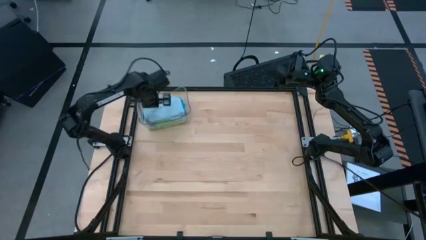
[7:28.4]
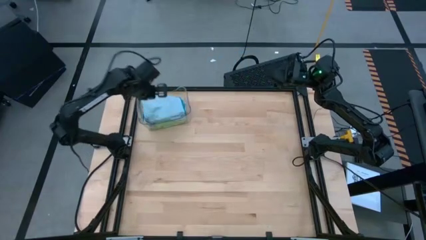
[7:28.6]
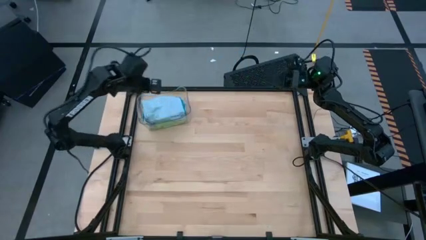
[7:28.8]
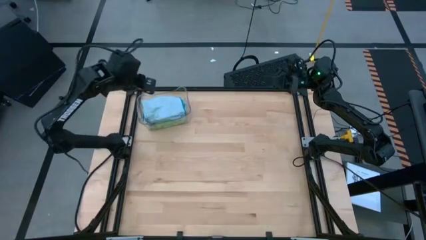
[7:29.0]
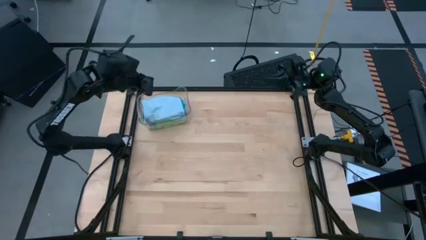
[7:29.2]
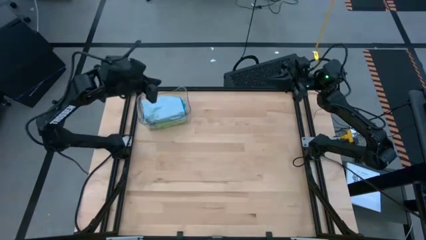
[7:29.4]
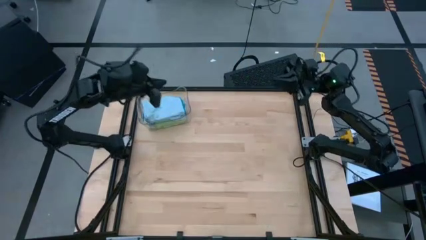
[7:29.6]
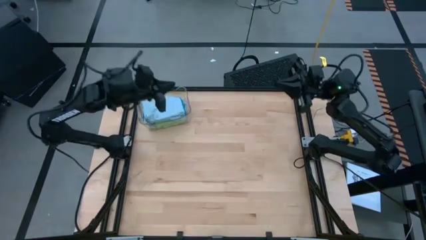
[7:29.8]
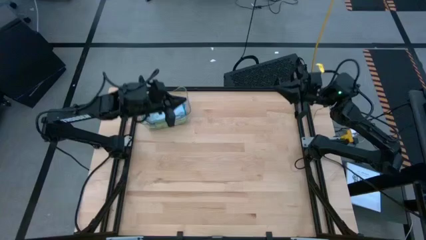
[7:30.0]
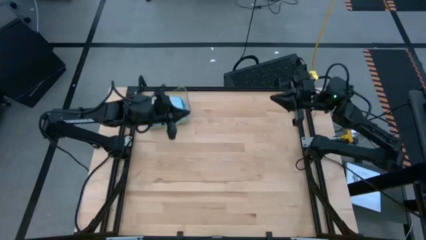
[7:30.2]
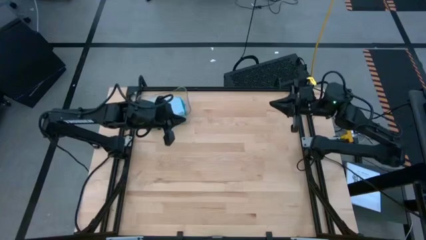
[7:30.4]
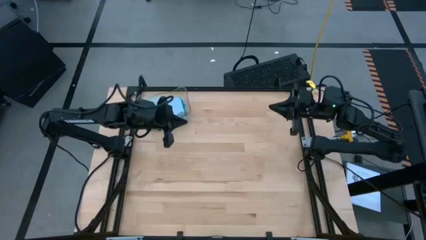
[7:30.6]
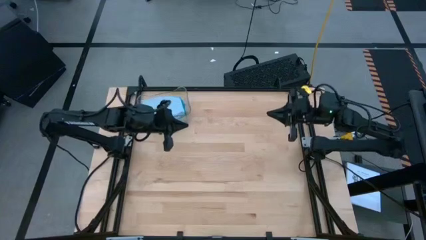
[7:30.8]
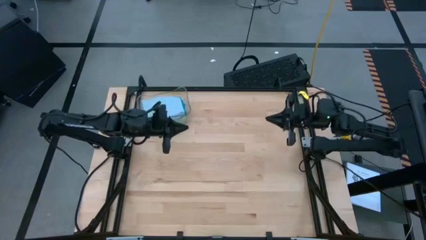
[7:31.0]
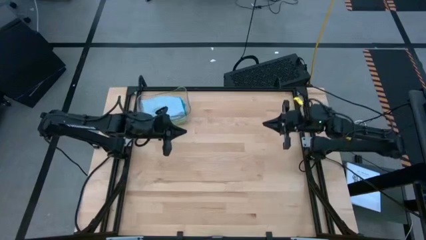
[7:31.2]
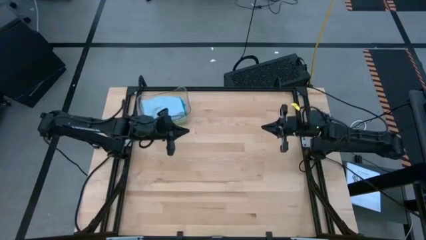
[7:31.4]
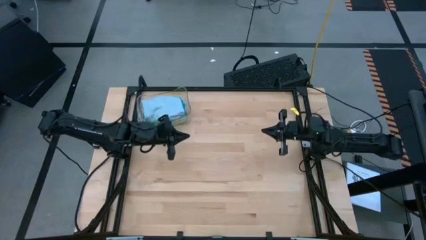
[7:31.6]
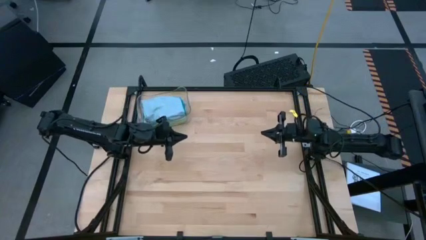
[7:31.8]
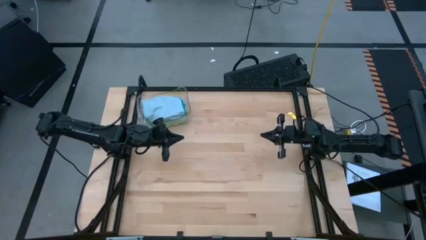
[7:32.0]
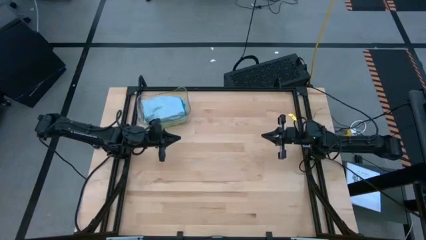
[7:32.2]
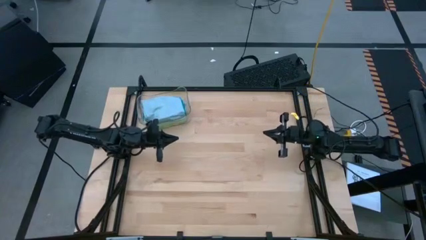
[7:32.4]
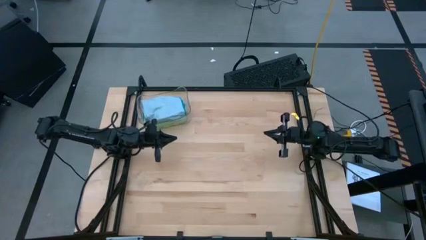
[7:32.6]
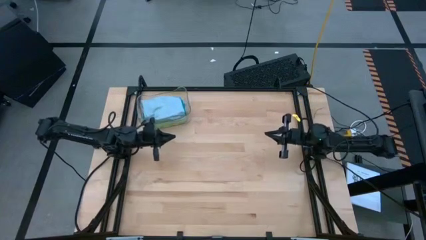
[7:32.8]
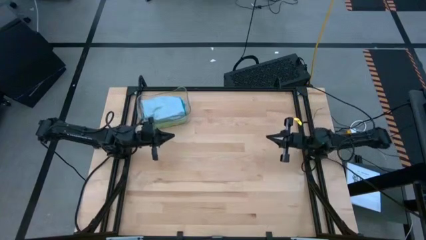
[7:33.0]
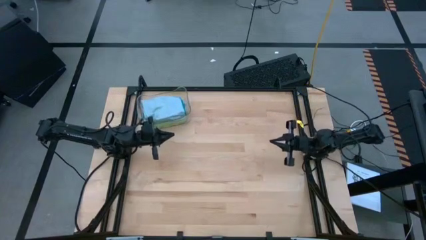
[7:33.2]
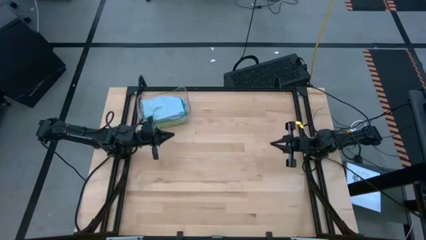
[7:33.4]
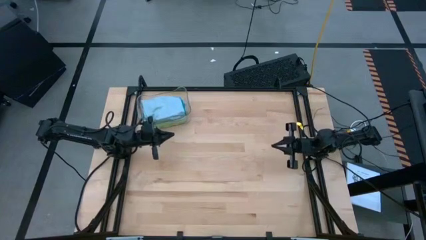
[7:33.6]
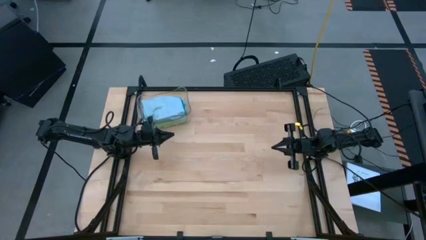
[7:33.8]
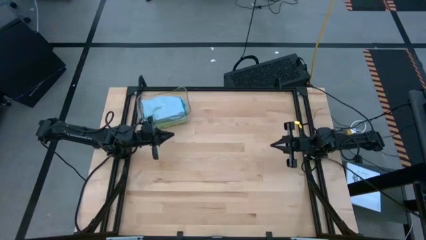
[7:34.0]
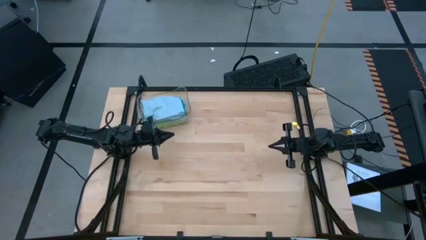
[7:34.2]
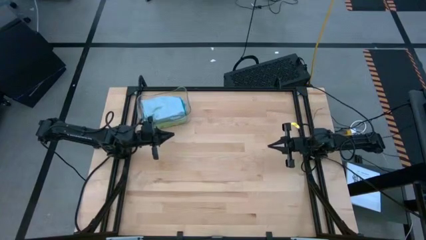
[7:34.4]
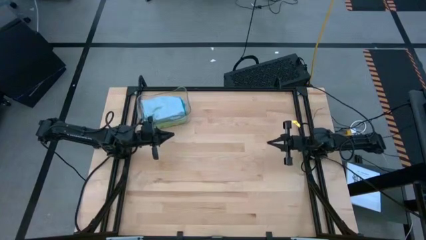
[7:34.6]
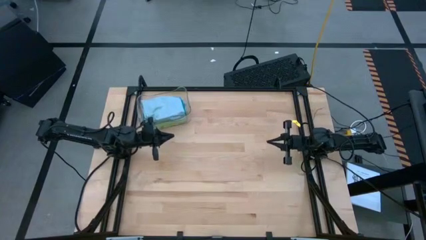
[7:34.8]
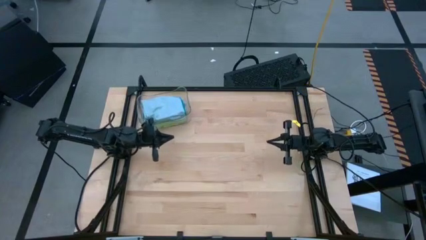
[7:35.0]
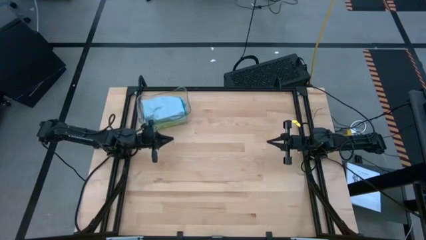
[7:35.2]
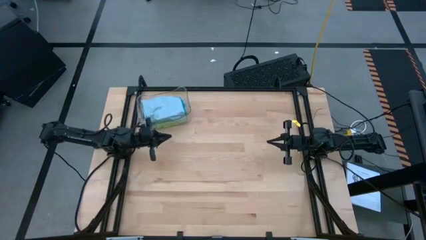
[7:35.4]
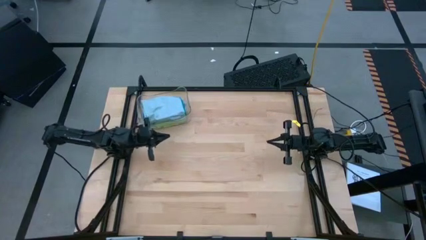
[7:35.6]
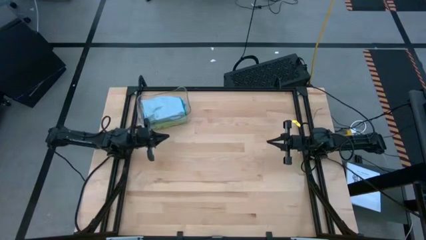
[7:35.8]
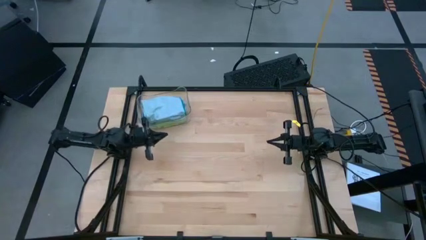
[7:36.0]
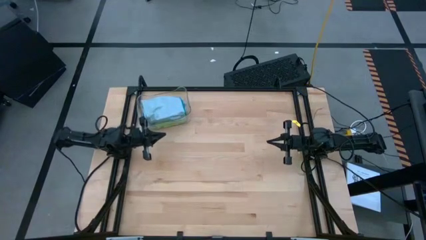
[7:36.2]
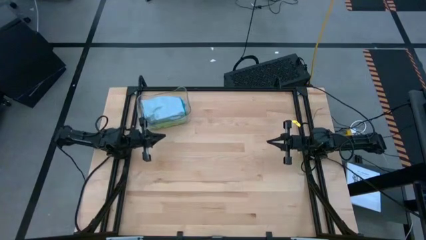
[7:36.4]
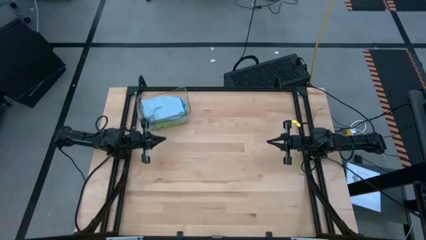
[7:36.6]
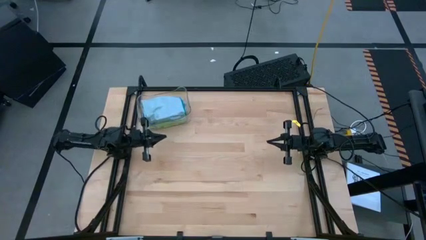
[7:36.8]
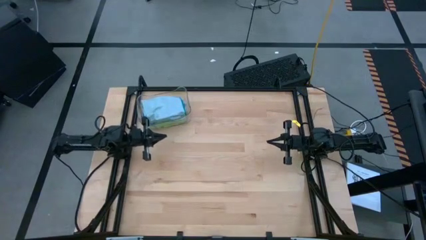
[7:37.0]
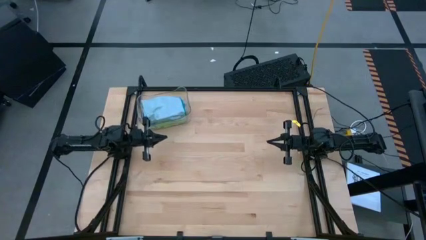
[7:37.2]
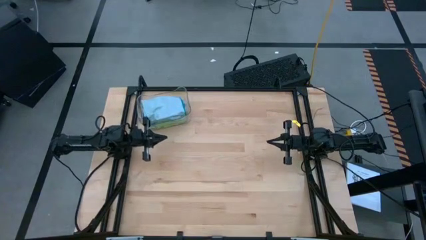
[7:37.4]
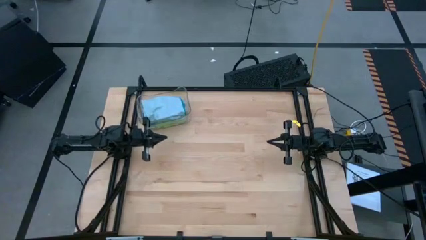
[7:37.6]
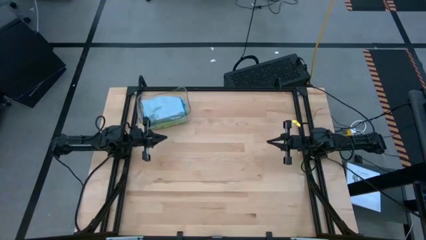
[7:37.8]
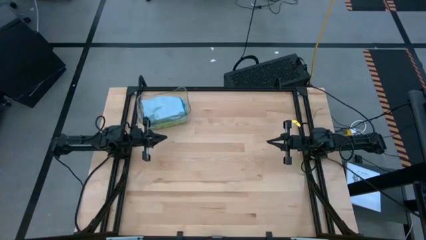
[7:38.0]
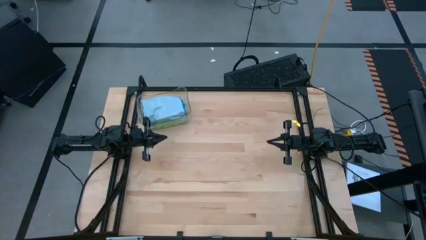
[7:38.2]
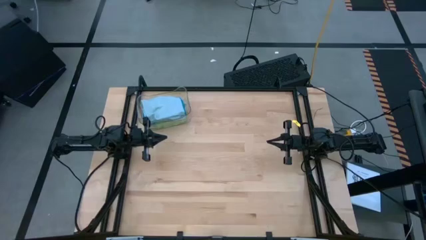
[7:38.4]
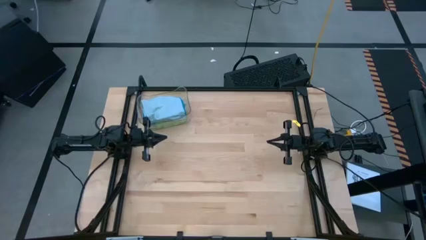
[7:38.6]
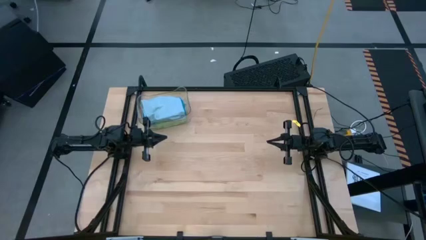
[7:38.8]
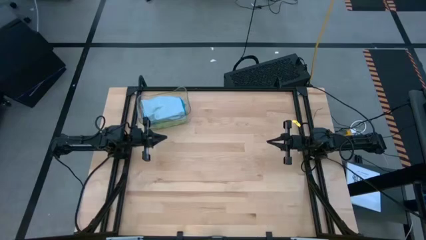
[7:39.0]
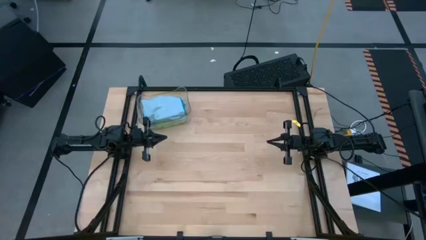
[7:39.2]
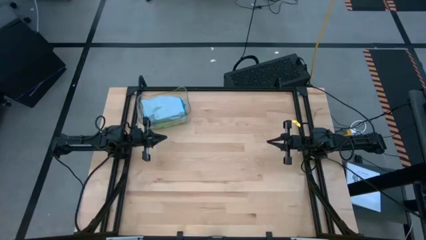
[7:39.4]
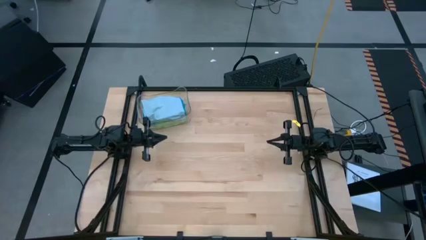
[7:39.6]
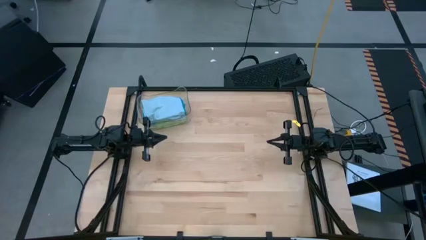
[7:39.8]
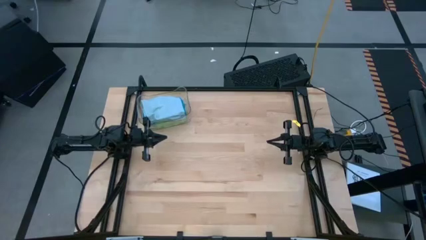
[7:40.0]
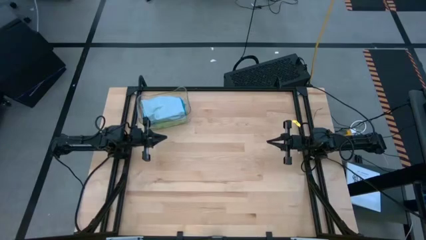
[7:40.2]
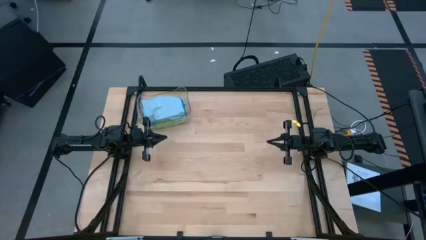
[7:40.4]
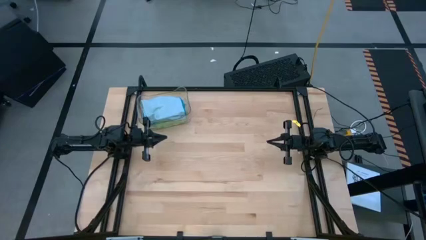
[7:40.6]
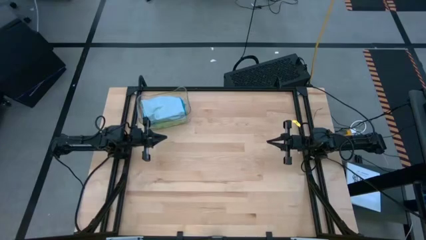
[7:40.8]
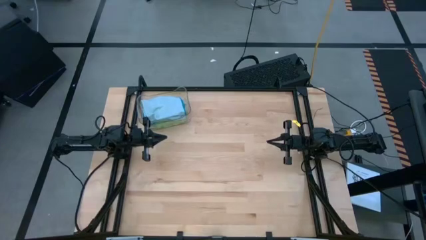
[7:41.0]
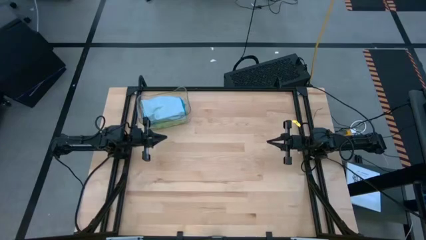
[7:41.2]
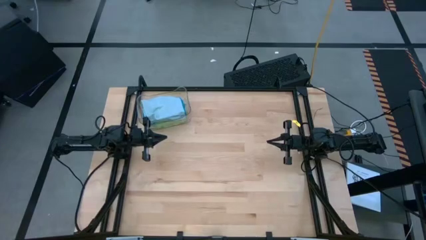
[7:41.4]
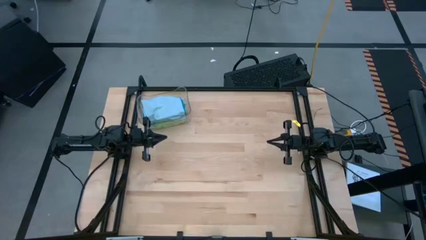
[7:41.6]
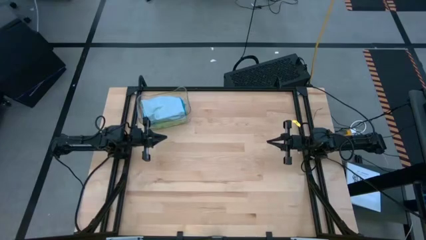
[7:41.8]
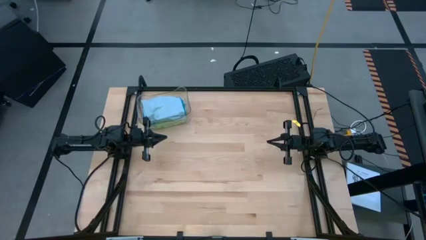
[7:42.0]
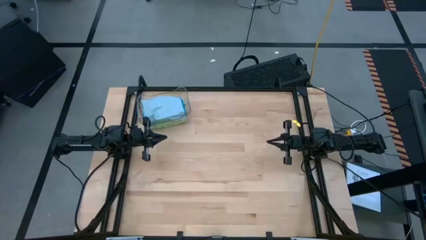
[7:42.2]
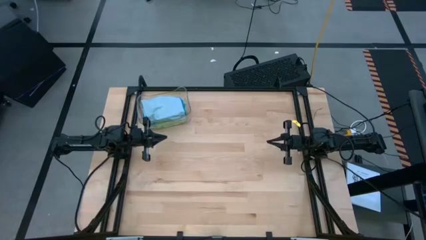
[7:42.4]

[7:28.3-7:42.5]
Task: Fold microfiber towels
Return to Home Position

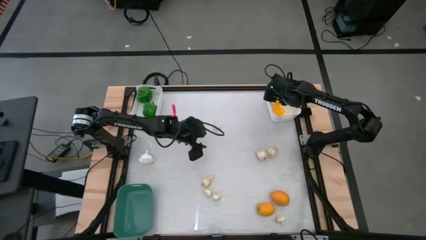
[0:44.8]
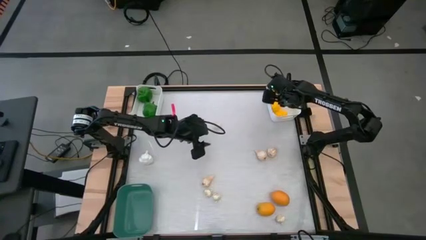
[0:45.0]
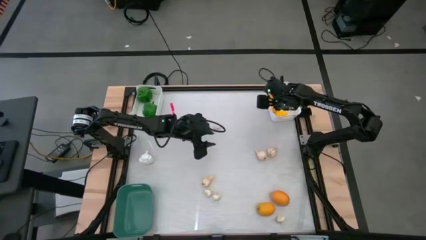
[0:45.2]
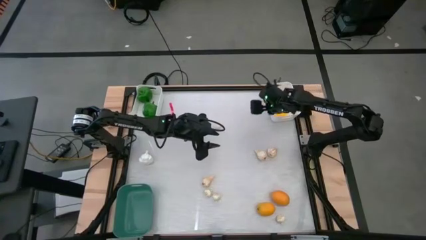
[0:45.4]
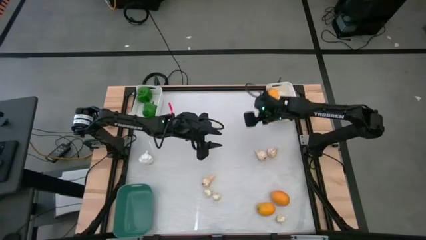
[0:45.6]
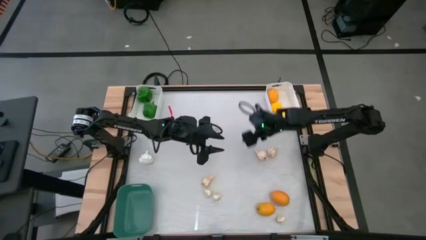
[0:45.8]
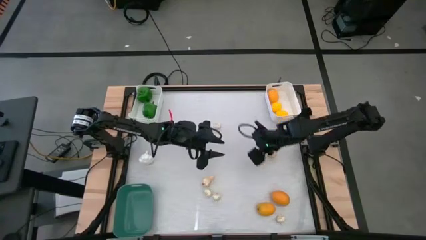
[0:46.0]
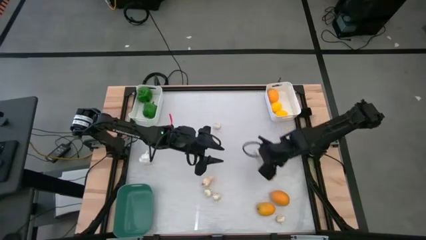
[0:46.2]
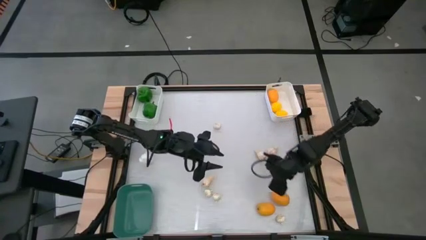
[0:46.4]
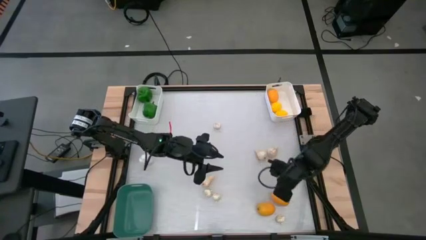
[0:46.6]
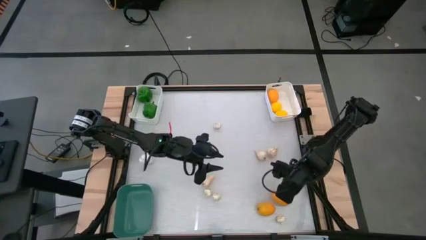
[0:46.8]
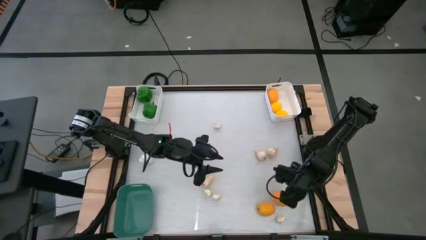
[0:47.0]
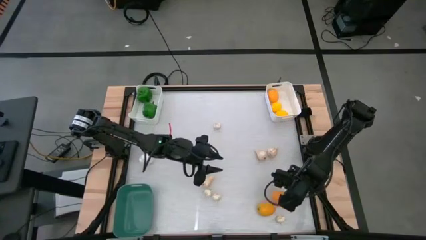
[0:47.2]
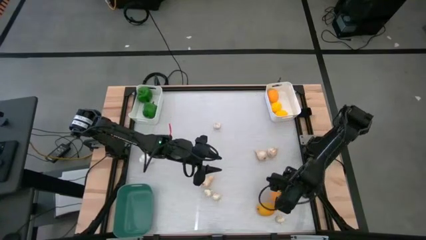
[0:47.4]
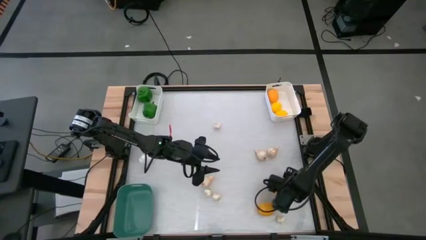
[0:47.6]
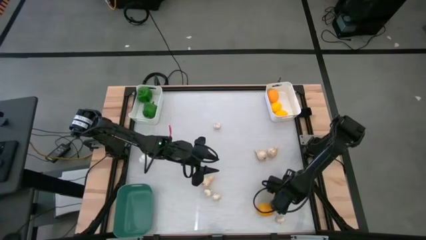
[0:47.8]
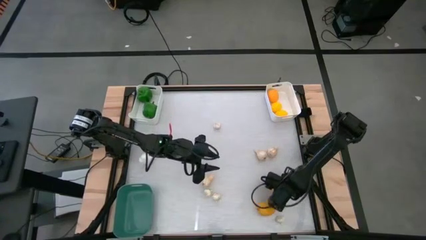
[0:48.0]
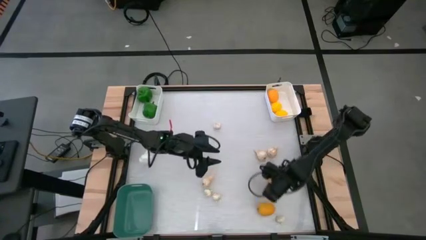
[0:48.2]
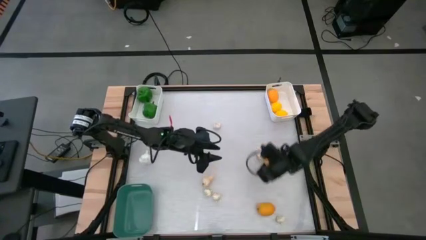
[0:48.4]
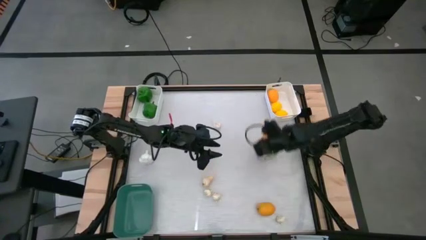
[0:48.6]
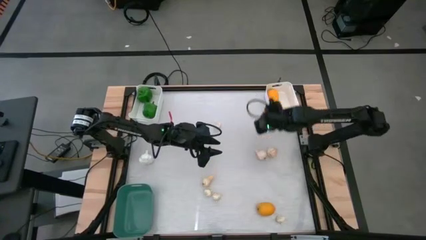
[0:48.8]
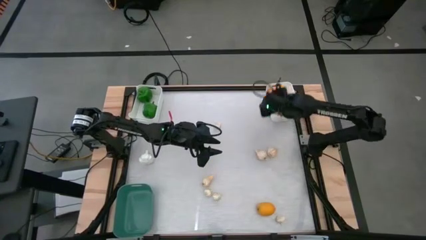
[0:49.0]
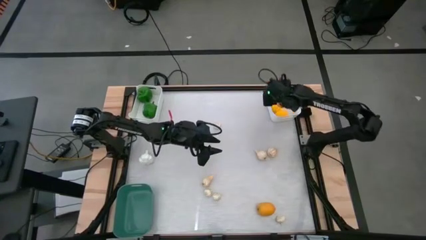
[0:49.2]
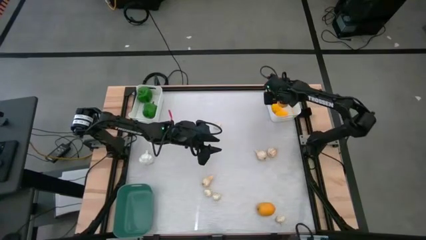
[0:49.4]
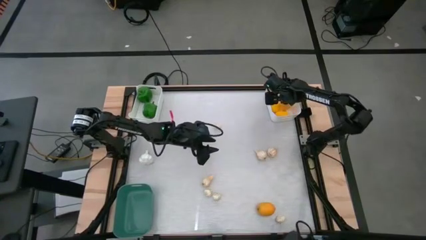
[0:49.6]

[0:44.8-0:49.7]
Task: Sort produce into baskets
Put the yellow lemon into the right white bin
